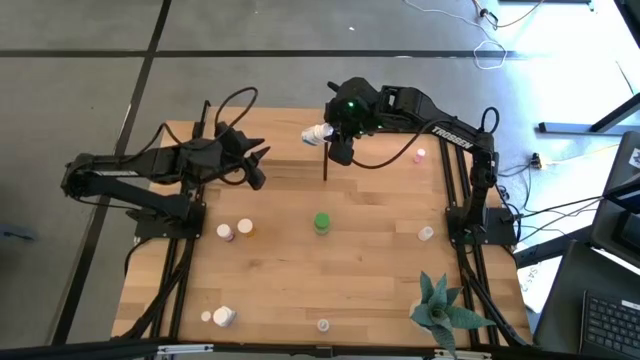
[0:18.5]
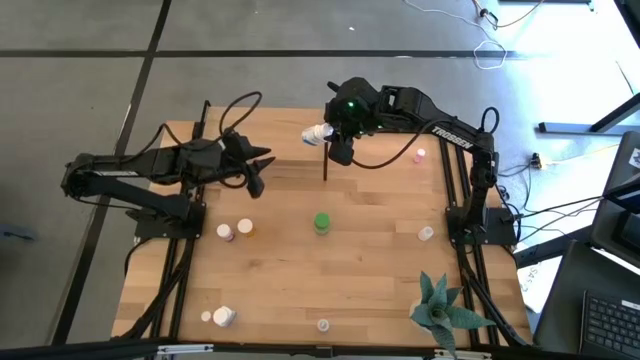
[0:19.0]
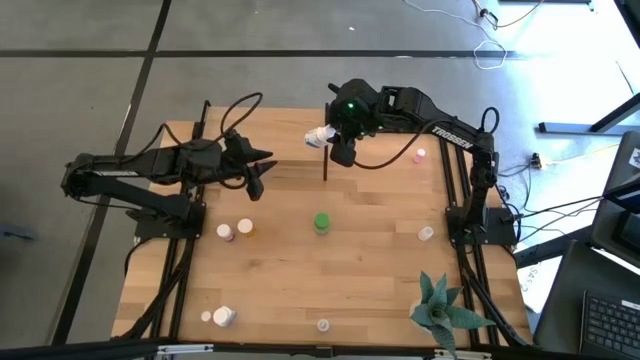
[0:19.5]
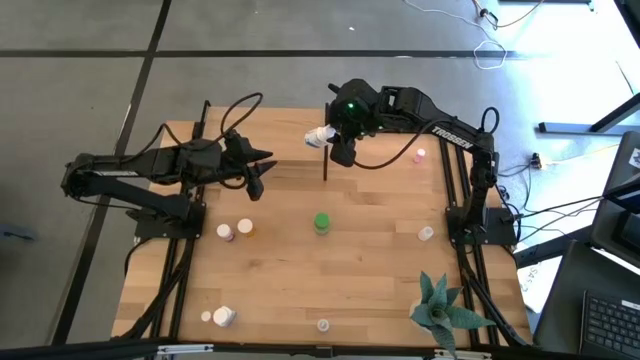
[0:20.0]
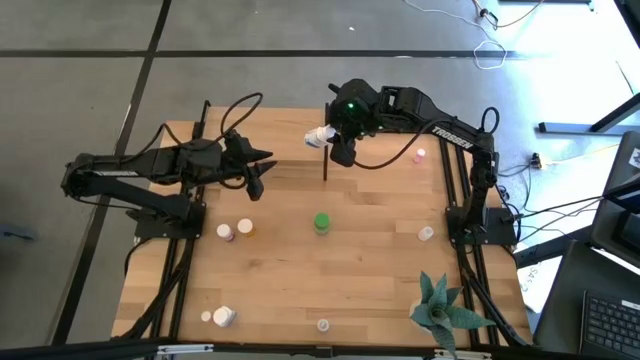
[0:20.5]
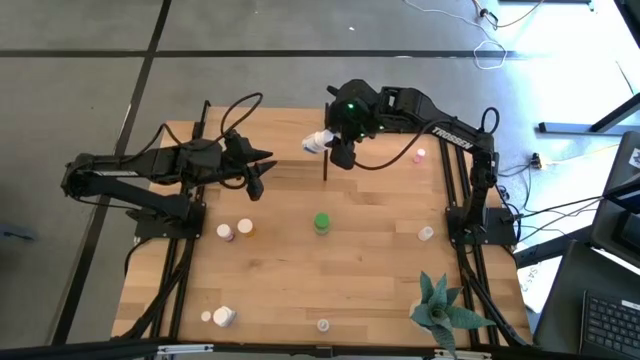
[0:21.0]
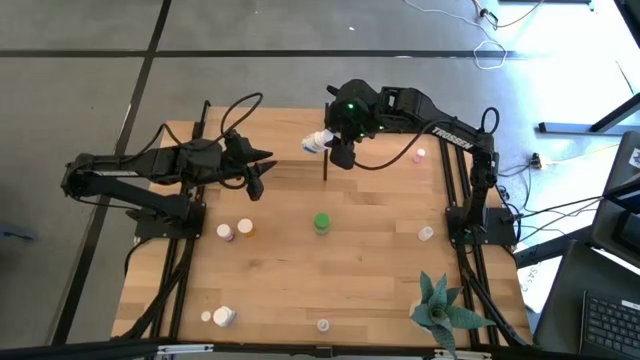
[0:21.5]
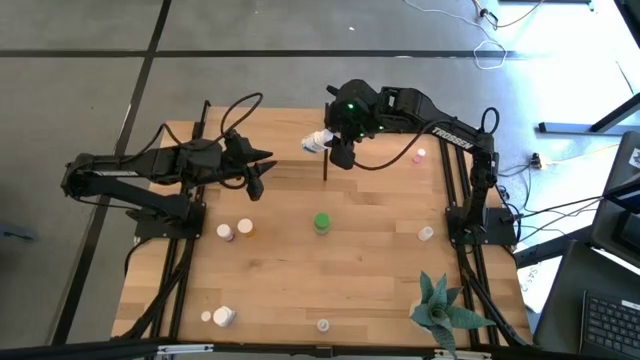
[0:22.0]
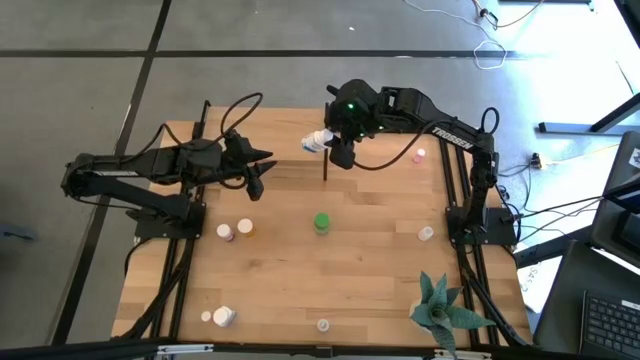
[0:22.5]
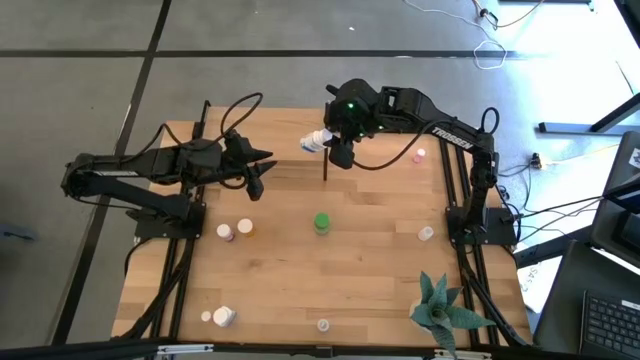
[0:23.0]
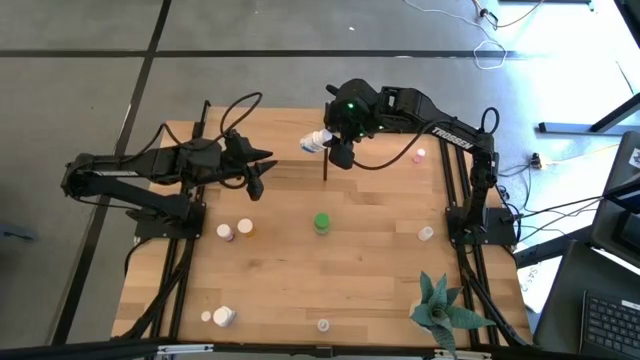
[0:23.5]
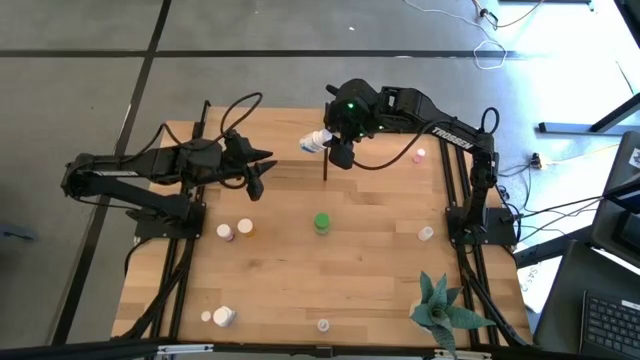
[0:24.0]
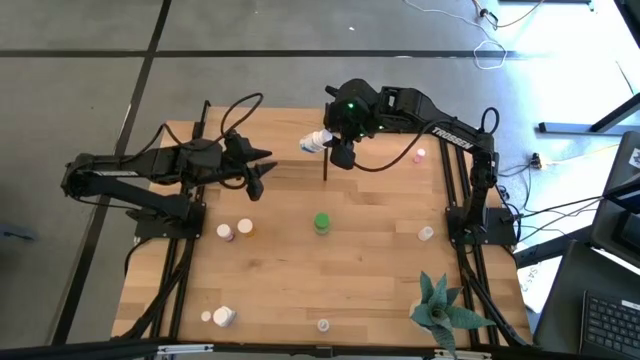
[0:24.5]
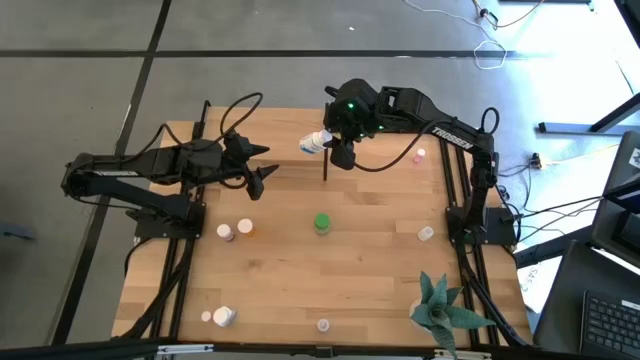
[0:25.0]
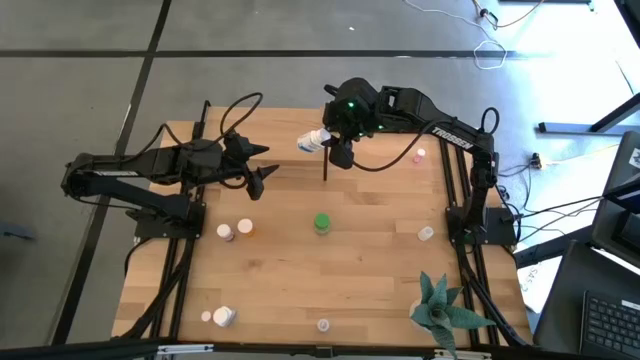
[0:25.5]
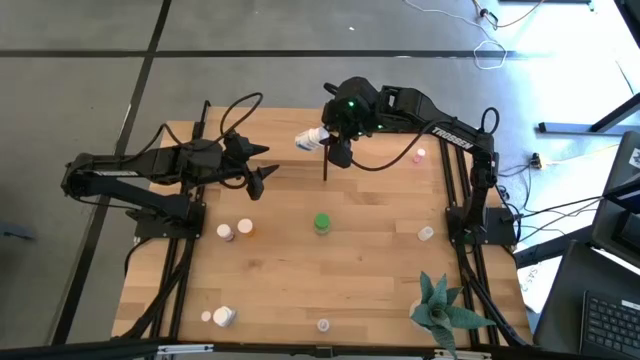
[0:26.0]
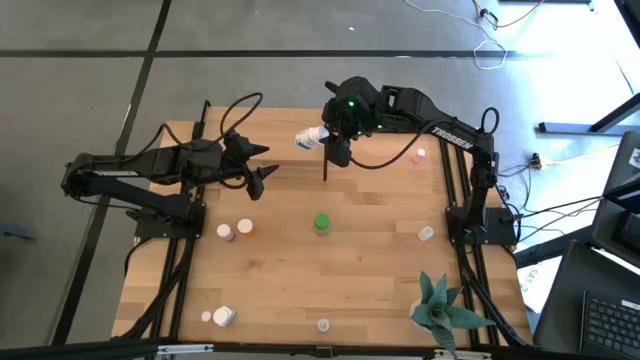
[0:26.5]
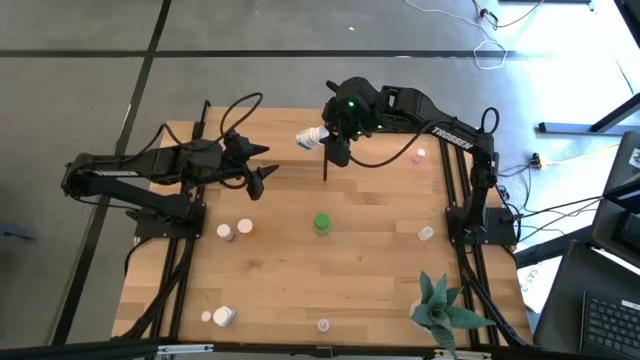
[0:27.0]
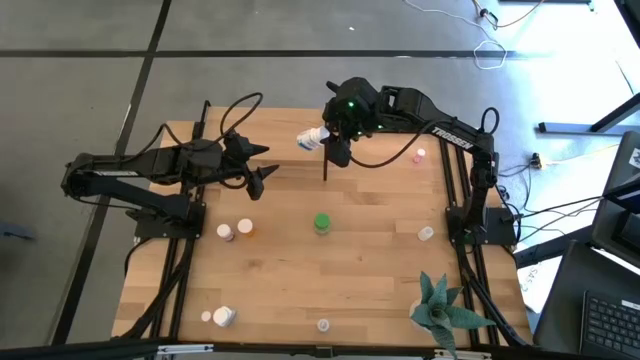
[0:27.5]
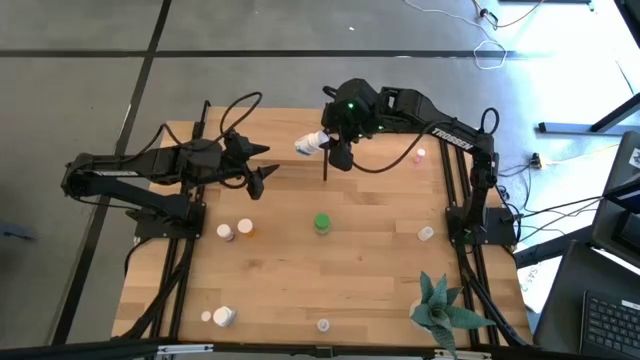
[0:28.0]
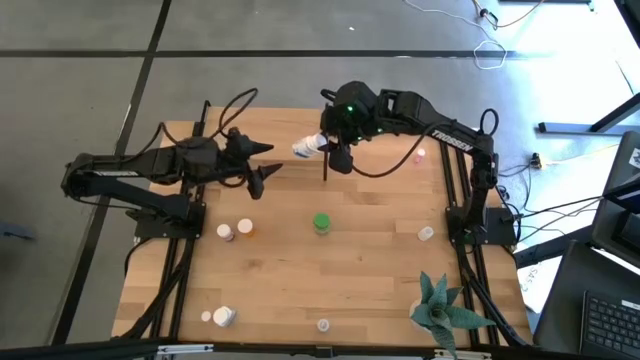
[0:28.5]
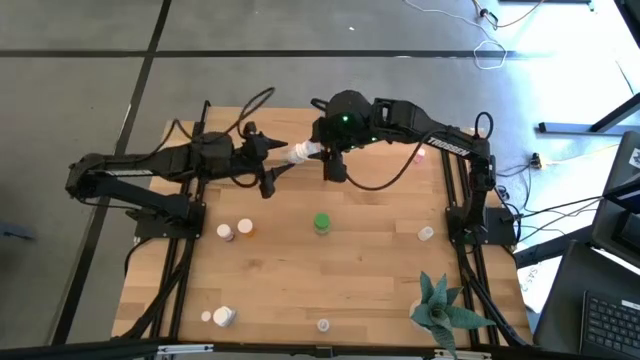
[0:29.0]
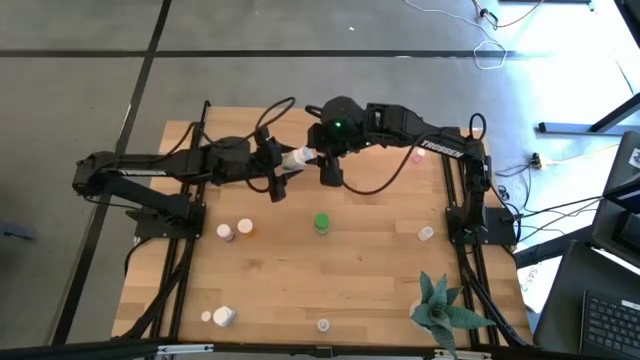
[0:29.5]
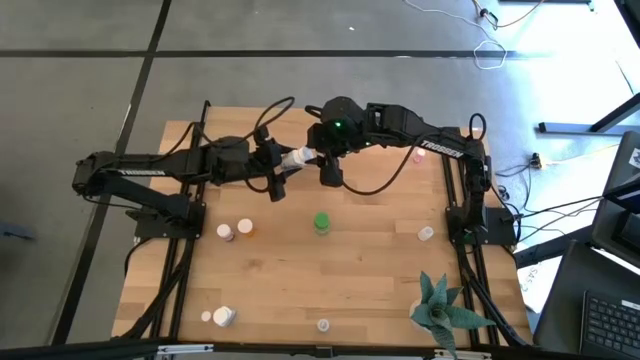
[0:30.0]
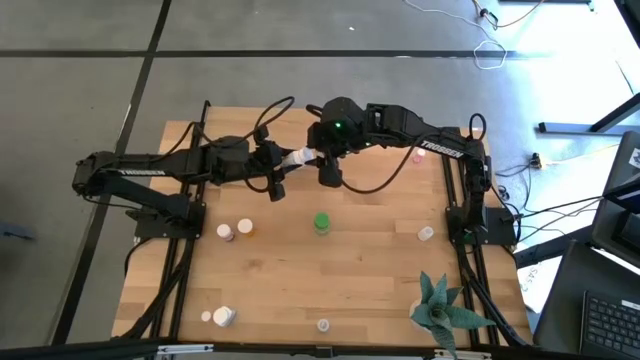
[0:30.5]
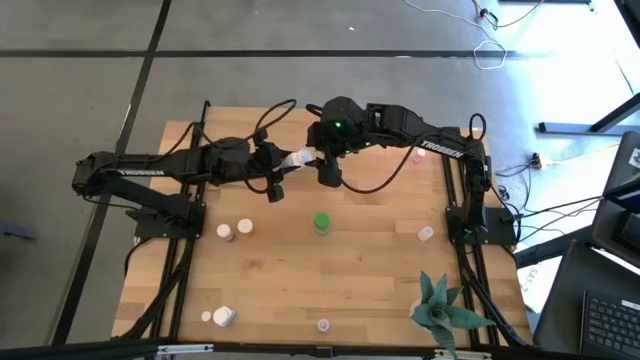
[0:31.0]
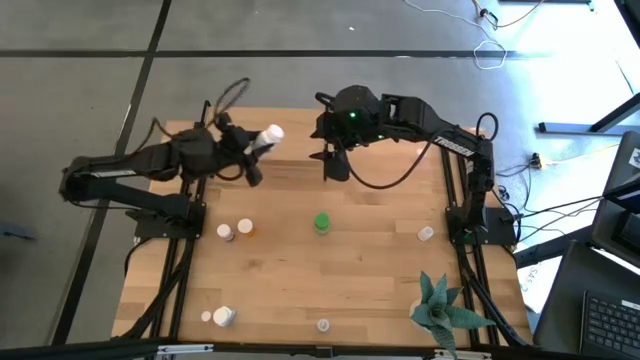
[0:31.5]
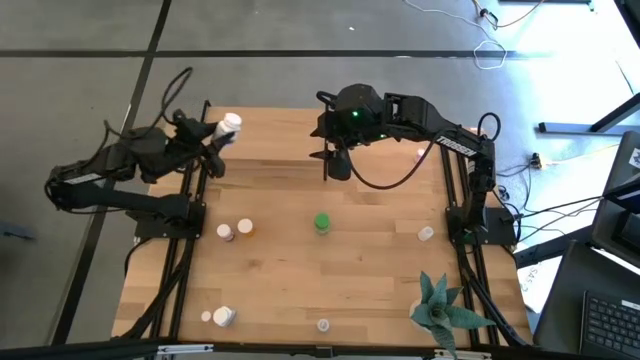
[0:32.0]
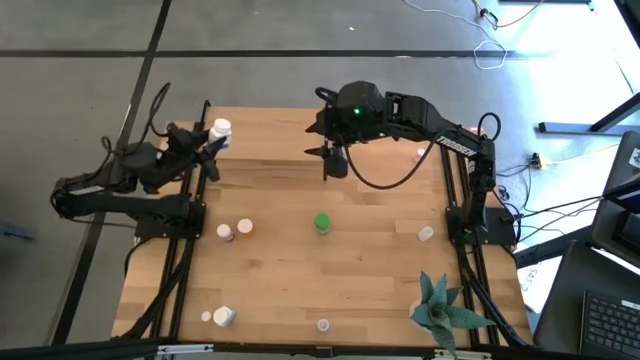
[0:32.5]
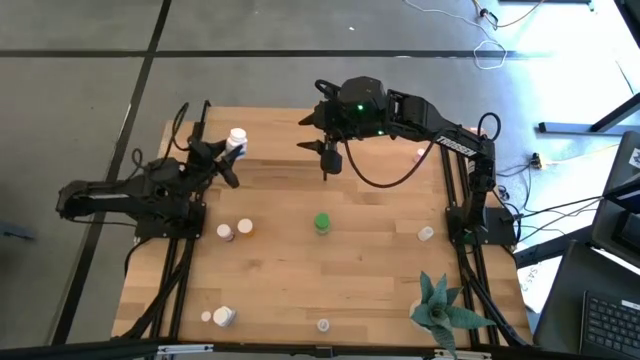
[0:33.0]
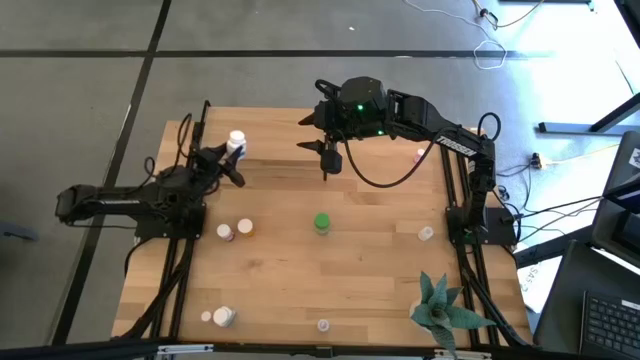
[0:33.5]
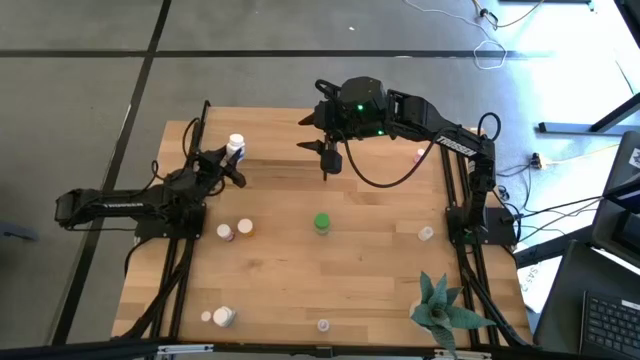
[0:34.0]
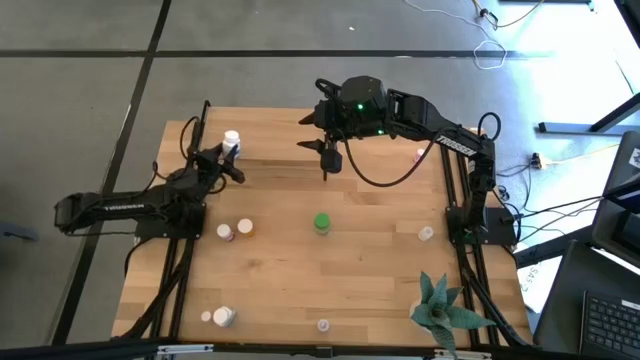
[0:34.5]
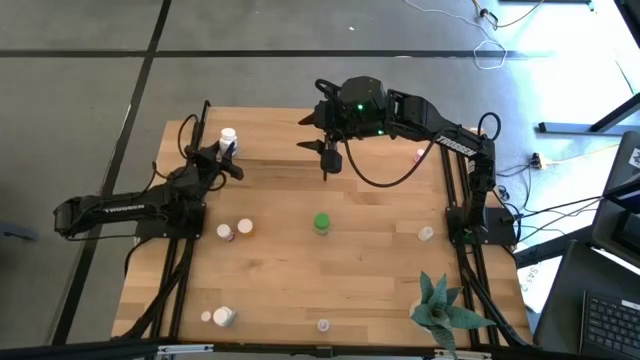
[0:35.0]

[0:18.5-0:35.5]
Task: Pick and place medicine bottles onto shelf by color
Put the top white pill bottle on the shelf

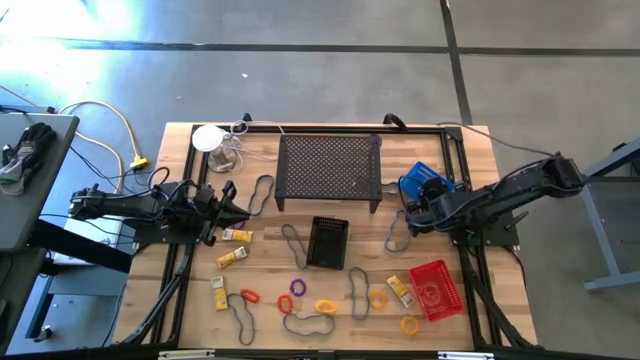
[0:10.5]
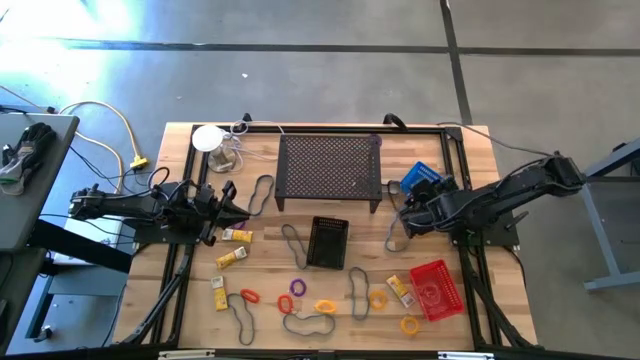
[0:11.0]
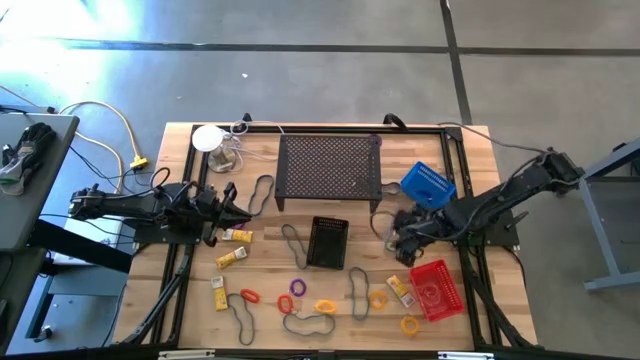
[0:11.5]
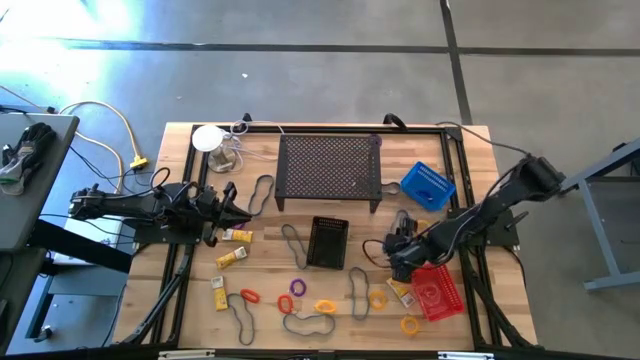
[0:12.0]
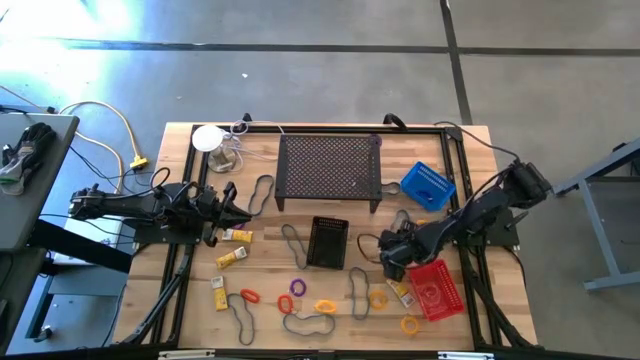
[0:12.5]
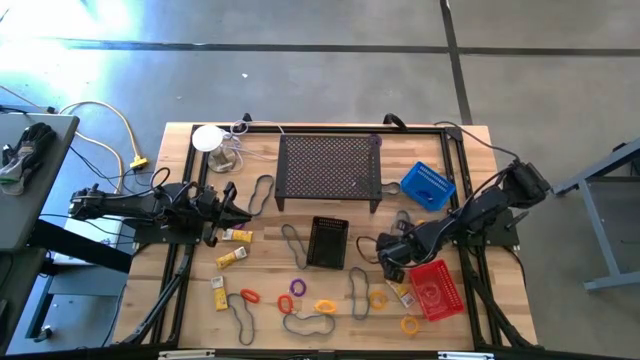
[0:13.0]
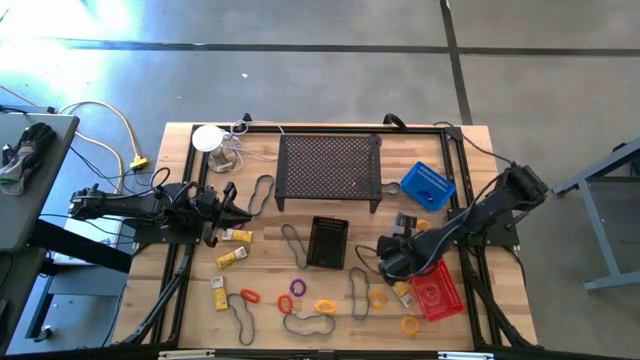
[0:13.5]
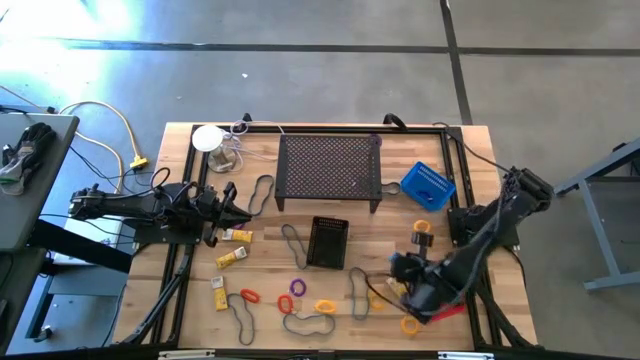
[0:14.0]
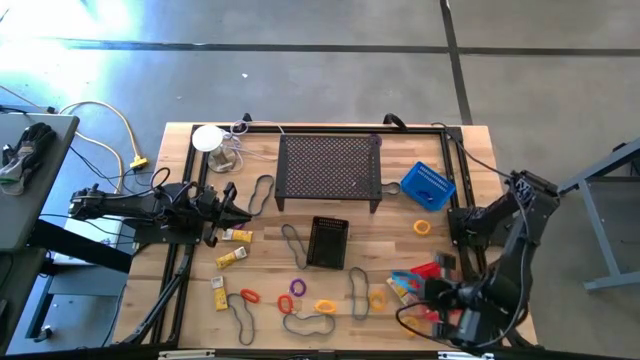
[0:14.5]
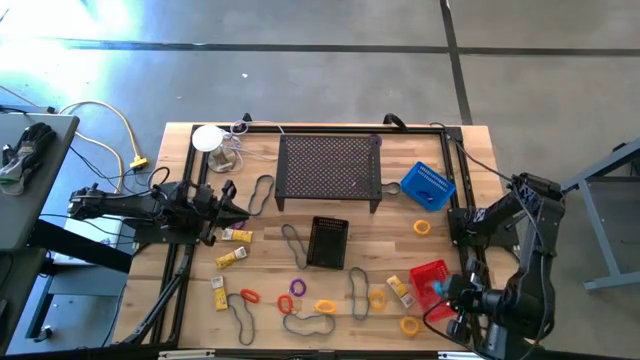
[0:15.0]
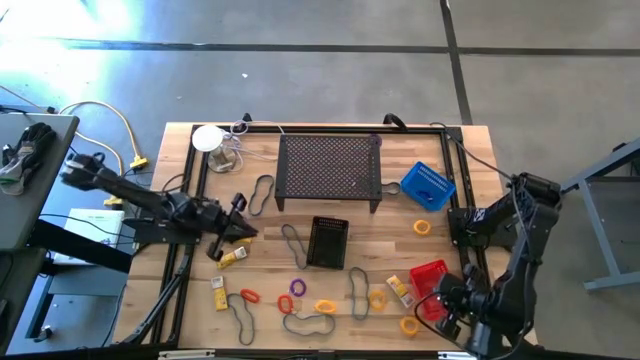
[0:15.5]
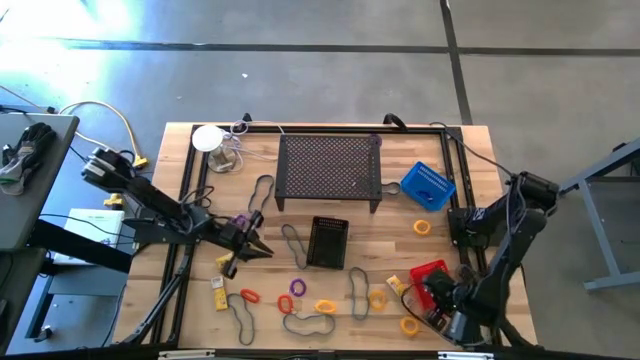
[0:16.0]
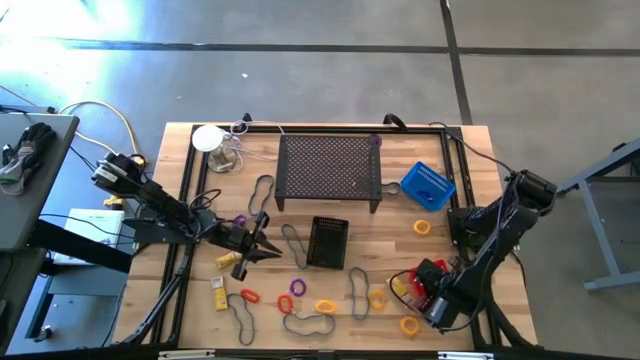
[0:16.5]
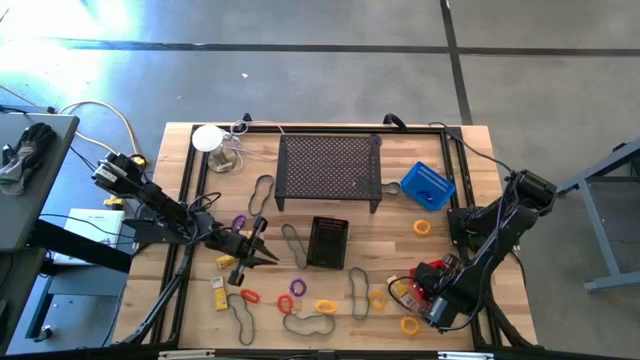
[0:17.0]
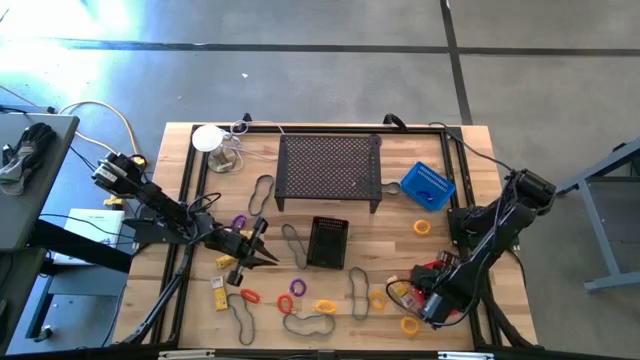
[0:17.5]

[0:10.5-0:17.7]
Task: Pick & Place Office Desk Supplies
Put the blue rubber band into the orange bin
